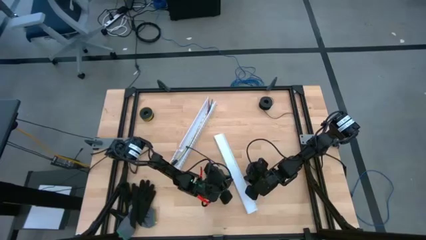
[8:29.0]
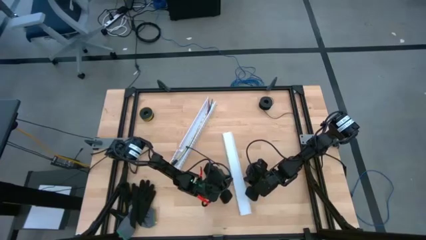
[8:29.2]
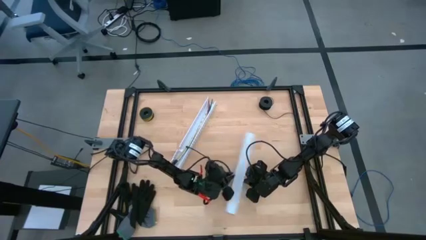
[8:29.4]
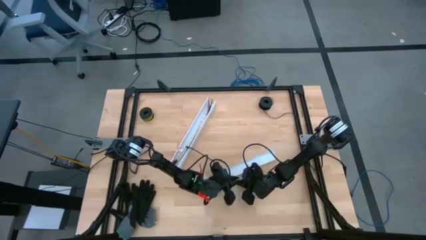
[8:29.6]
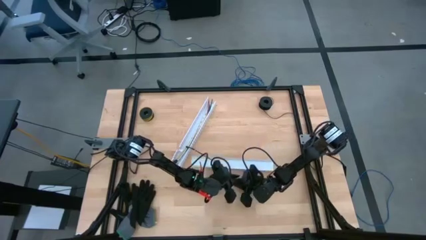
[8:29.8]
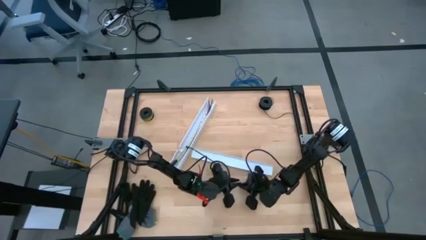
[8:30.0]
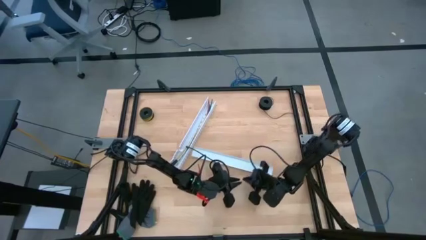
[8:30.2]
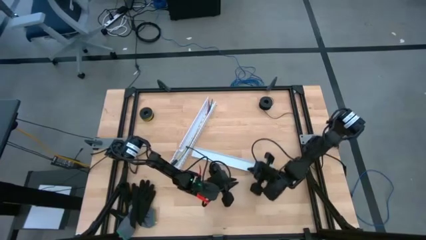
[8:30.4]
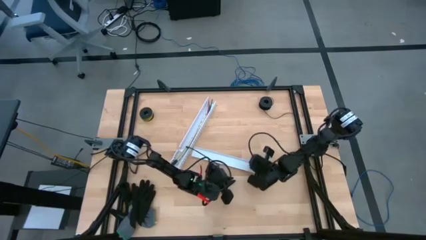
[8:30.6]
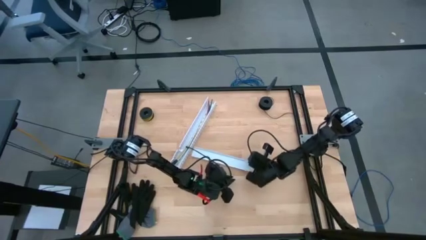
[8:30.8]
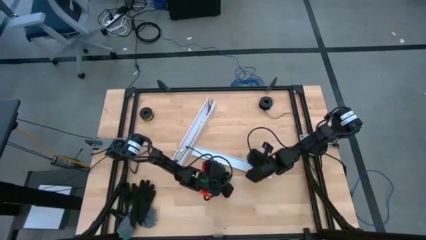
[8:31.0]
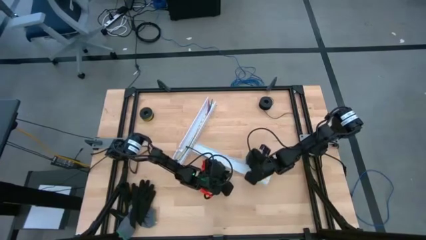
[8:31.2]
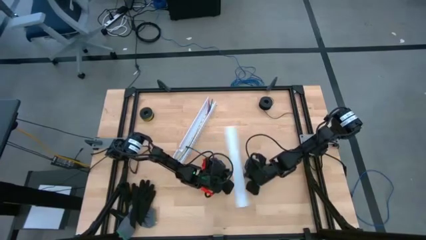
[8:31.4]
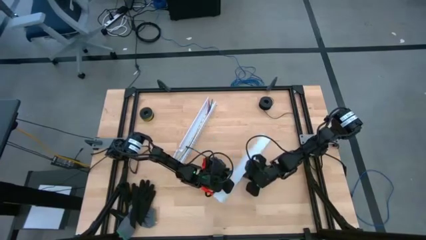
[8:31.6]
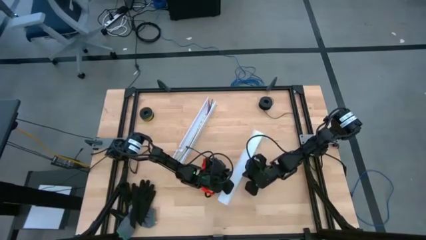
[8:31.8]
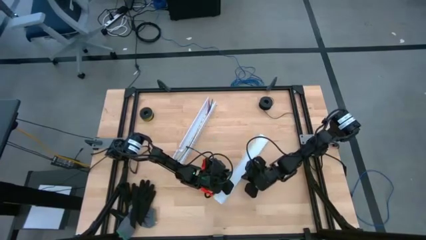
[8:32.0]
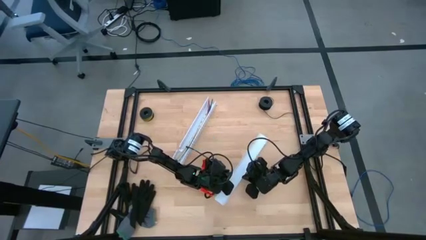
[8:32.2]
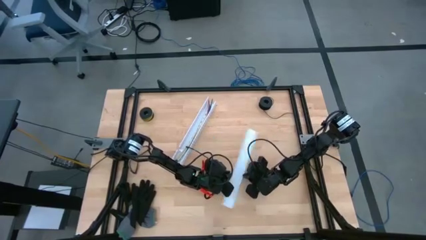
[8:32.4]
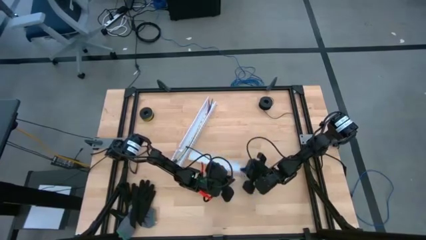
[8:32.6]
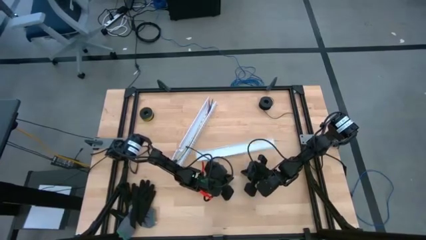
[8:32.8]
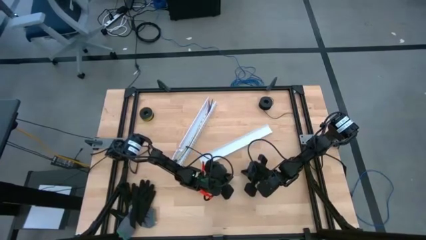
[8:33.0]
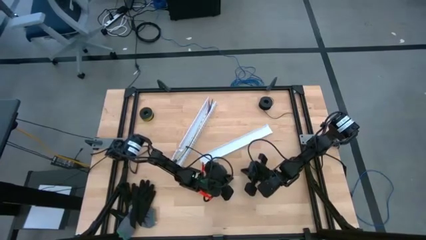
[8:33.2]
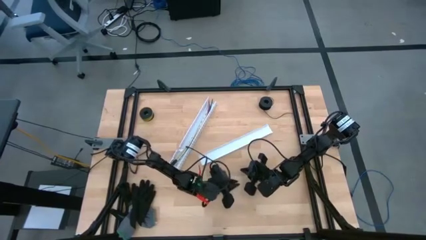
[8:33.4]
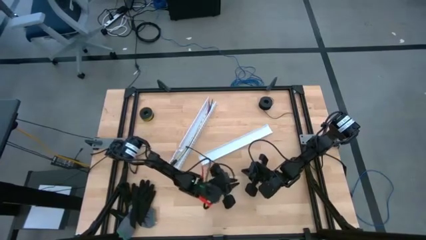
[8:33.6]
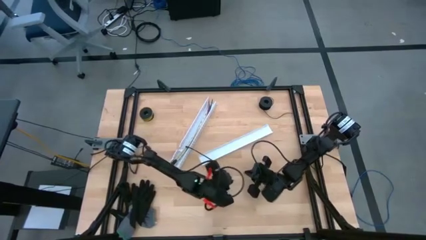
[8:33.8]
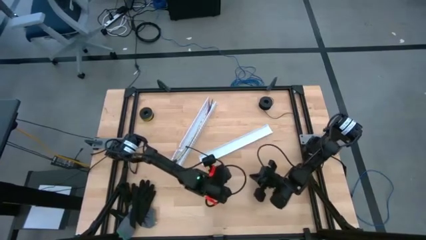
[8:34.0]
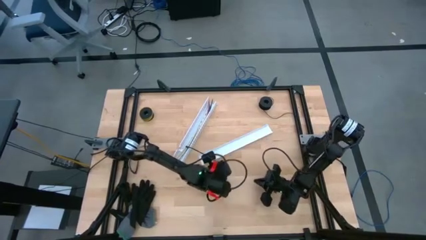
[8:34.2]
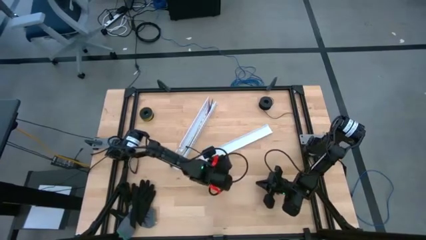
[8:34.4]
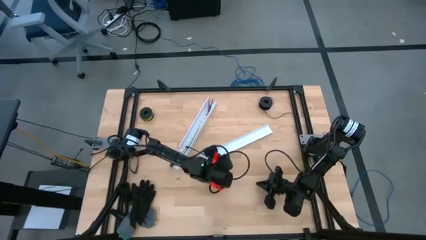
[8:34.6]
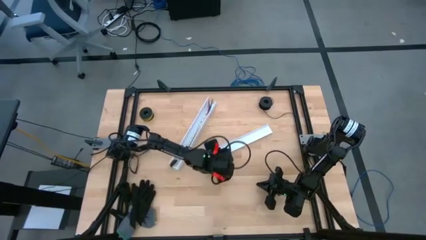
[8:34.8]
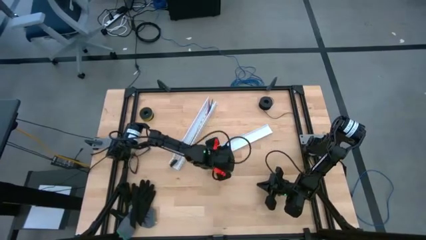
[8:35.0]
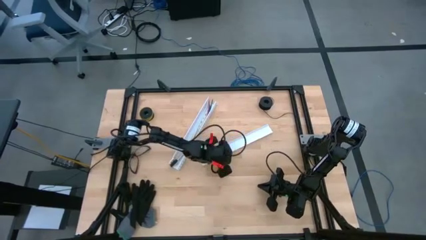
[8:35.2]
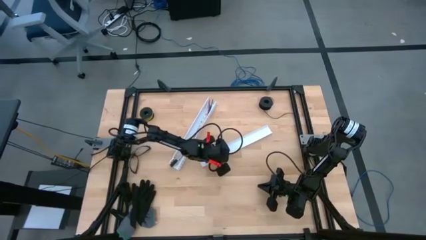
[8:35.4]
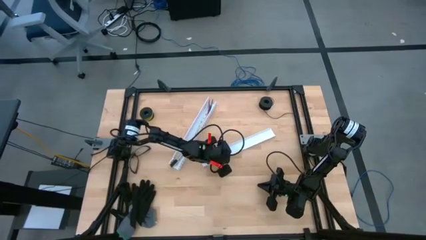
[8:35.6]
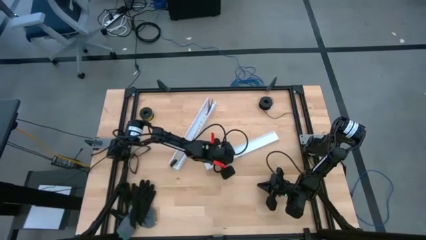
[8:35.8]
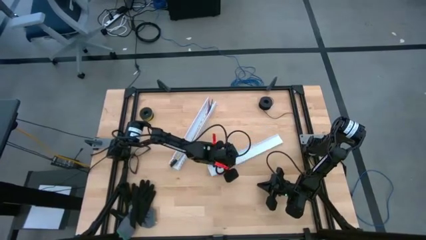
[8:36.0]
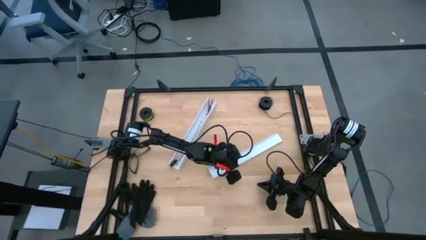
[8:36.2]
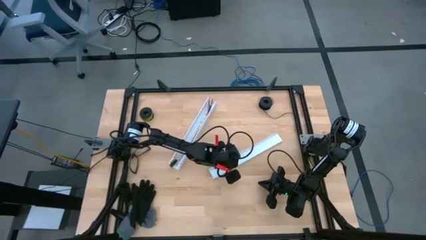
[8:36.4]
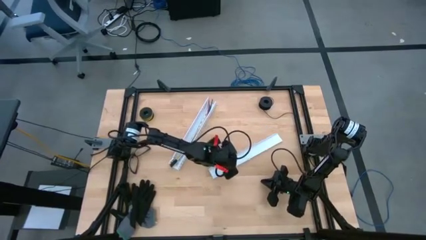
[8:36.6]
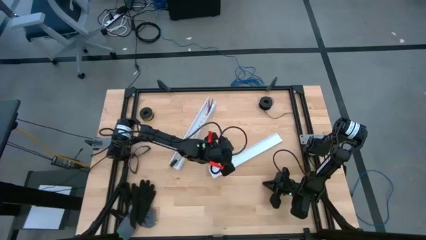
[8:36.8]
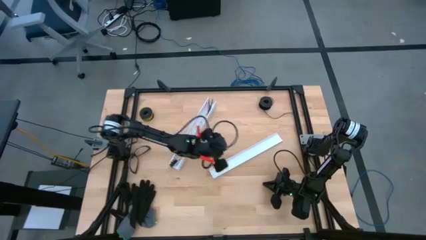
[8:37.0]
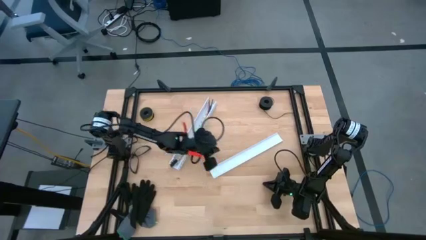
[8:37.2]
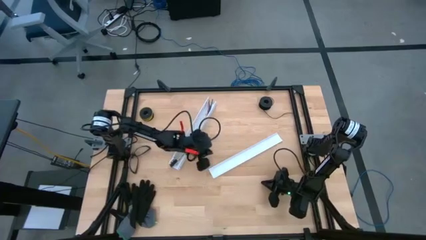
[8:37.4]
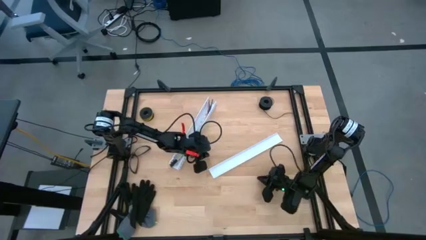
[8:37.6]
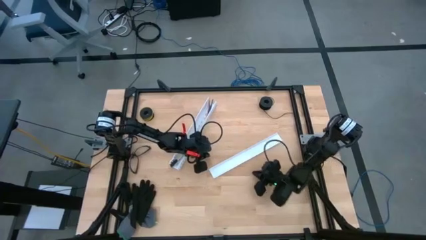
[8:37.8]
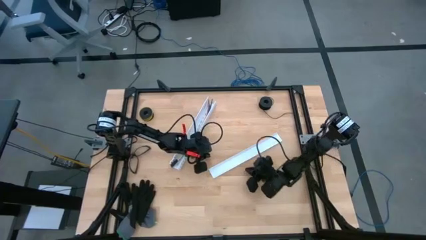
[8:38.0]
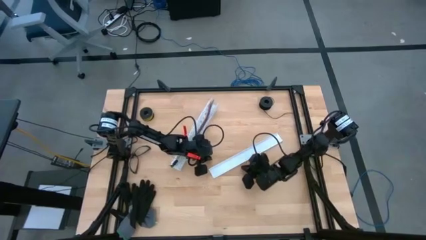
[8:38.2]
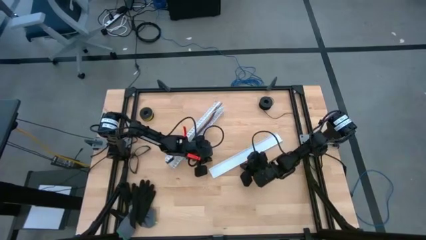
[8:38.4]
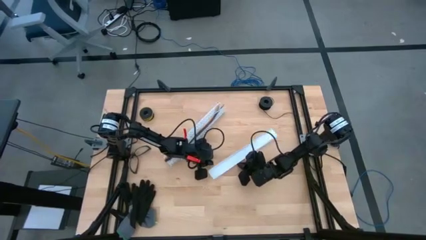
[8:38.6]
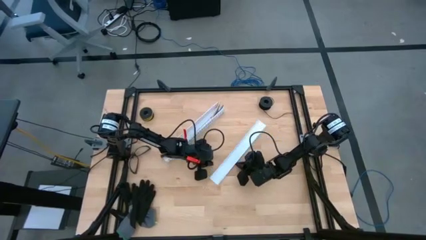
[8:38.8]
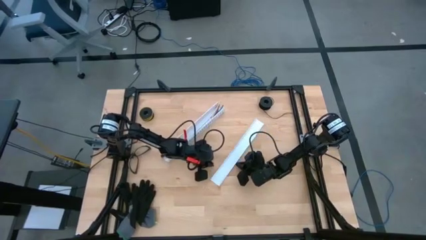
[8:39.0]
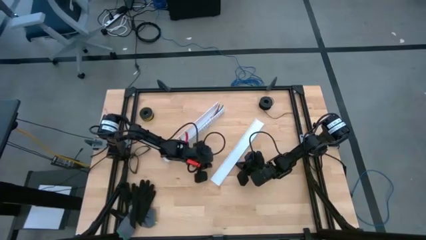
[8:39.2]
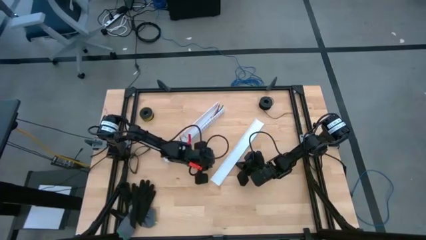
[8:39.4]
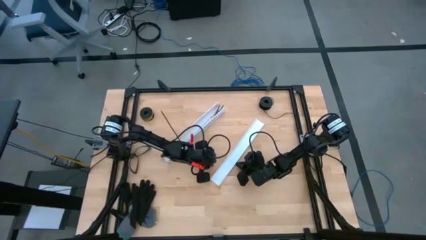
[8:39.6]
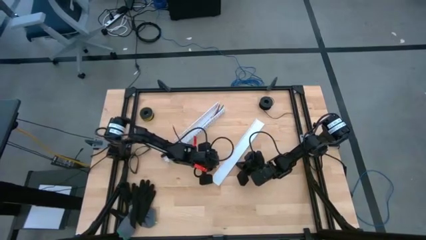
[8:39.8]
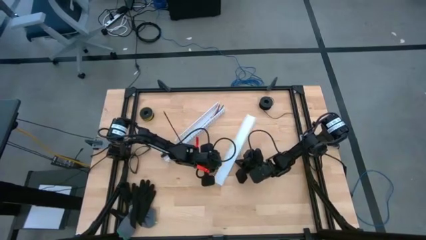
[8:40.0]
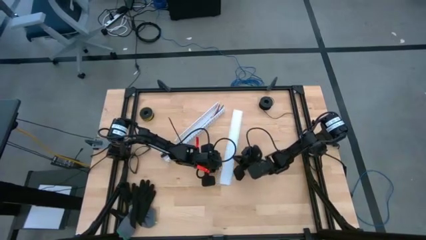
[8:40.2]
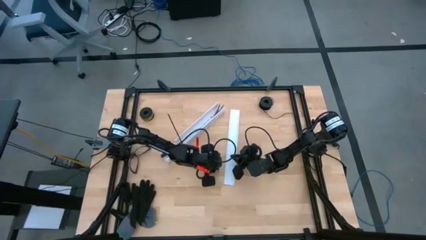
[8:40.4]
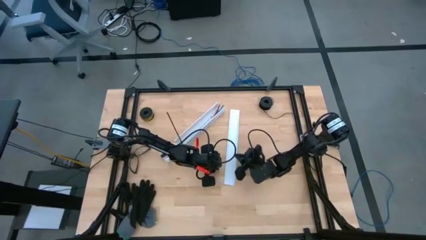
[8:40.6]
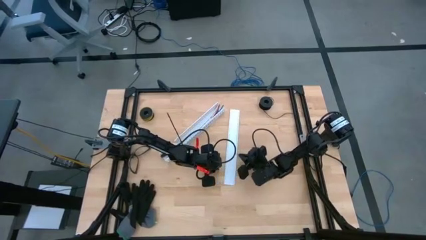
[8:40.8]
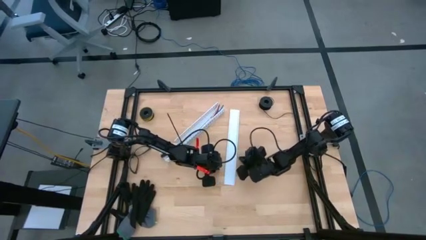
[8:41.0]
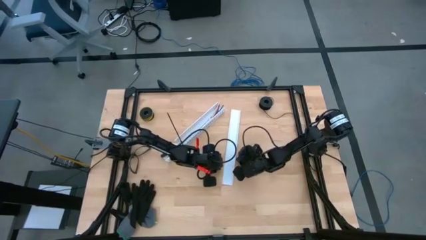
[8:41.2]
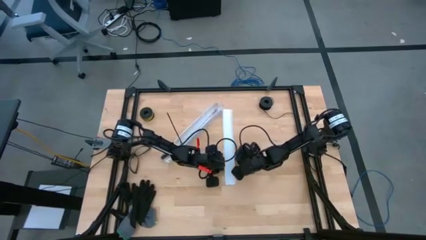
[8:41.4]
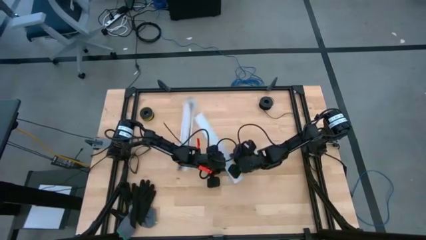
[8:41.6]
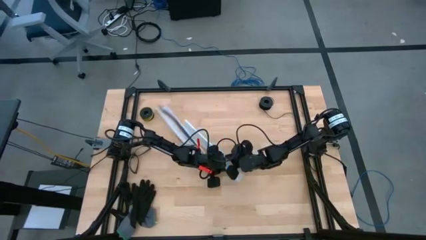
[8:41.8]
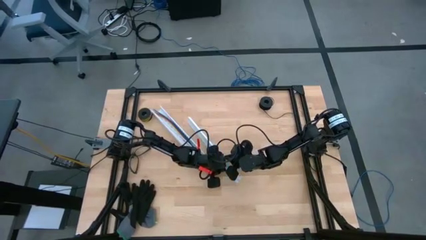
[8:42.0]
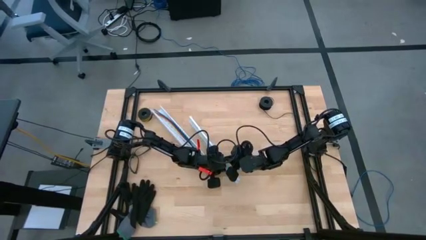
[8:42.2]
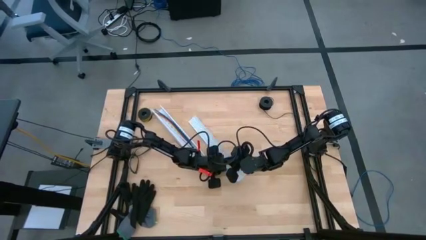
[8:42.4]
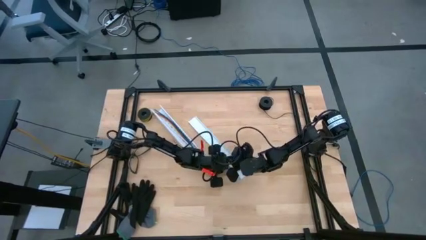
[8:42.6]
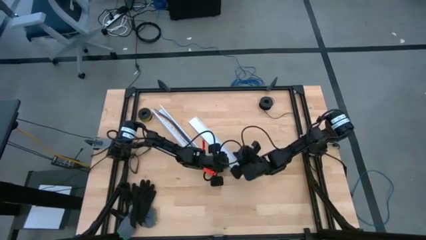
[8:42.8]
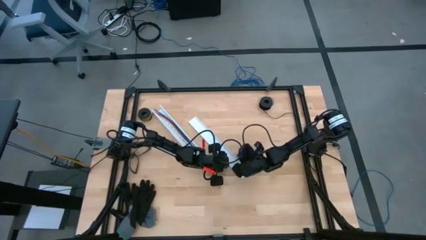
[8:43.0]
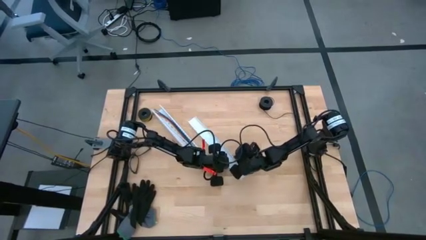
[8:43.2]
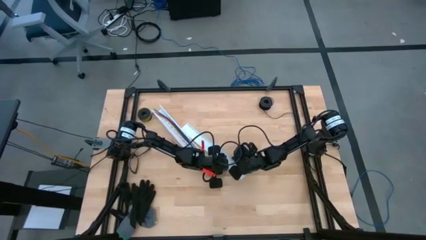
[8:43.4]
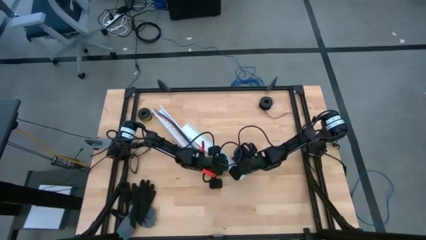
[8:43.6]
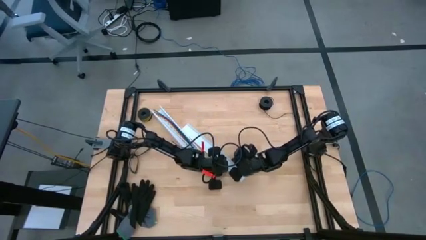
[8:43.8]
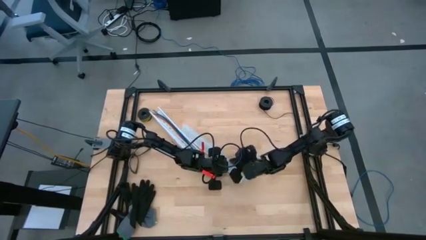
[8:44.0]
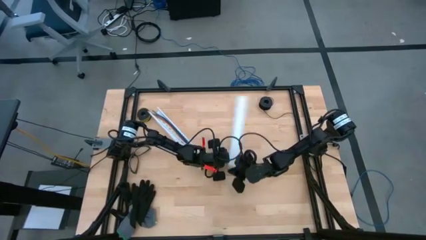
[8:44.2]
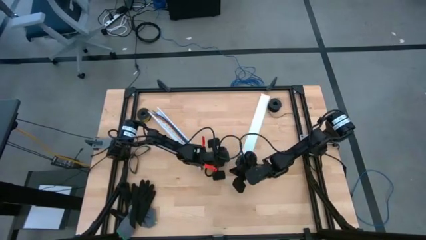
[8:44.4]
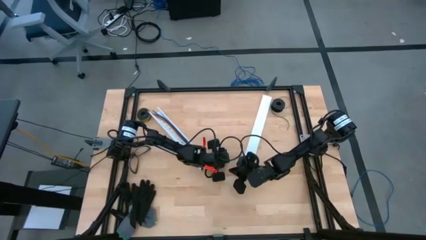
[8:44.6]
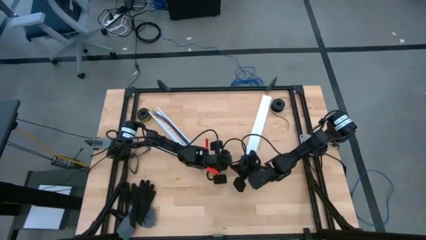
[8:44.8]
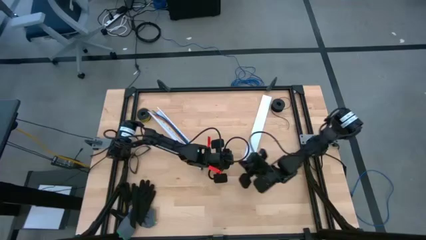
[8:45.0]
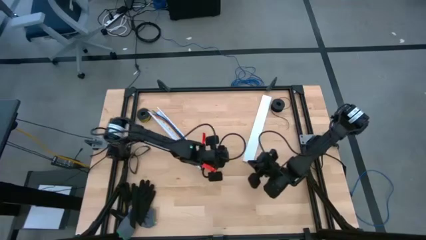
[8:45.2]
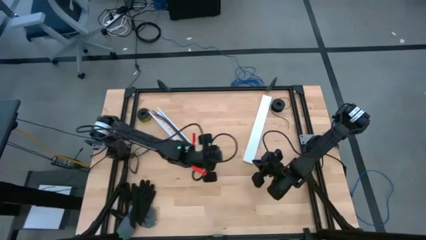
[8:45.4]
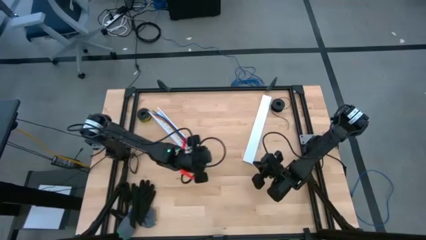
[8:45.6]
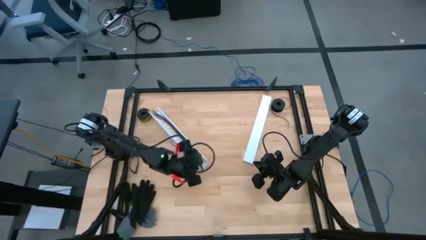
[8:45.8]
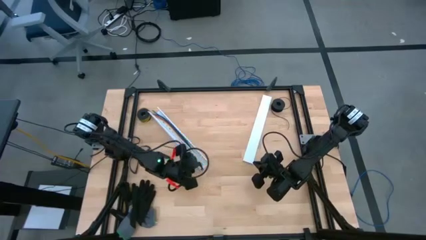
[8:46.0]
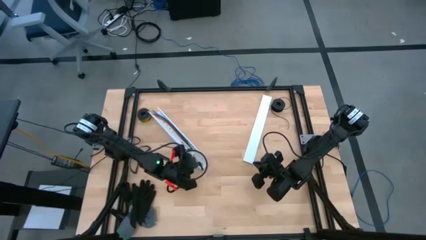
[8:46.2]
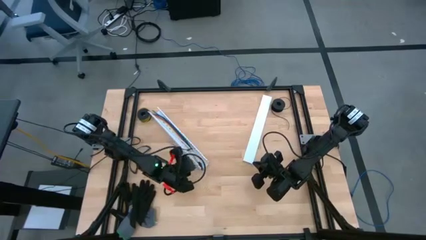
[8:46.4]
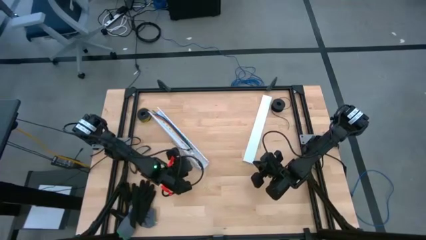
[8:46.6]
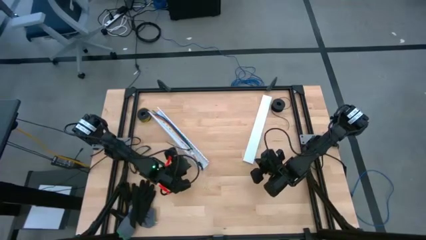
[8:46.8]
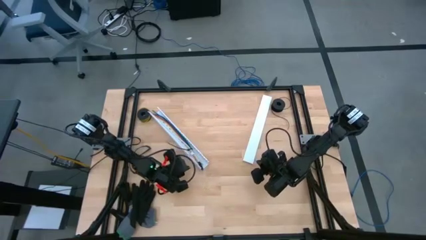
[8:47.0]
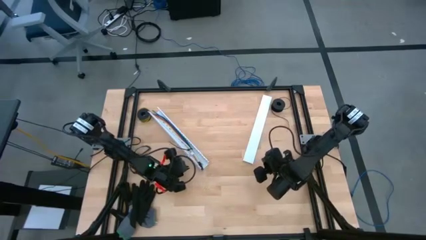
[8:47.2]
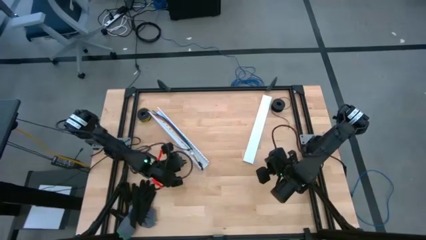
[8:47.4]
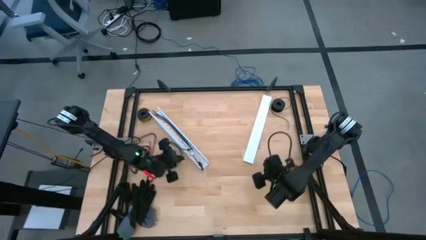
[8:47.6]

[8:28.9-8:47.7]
Task: Ziptie cables
Close the white cable duct
